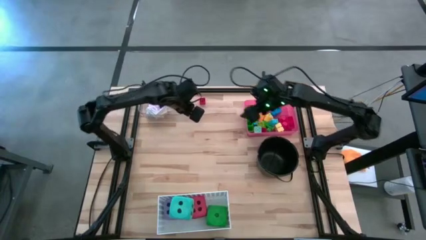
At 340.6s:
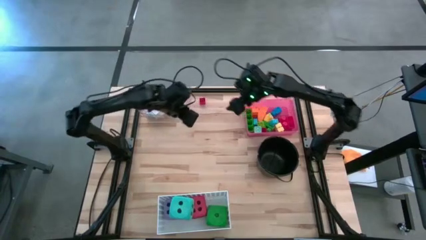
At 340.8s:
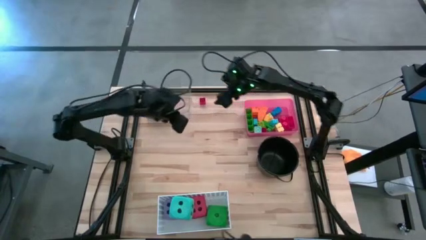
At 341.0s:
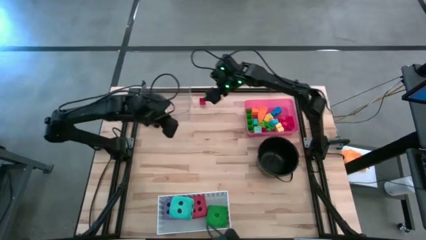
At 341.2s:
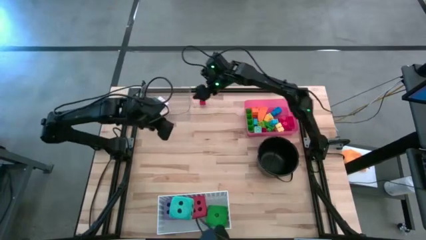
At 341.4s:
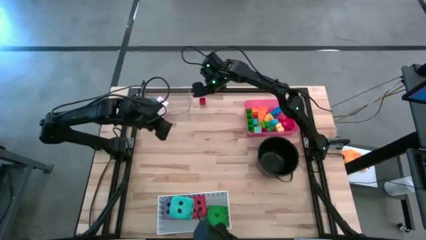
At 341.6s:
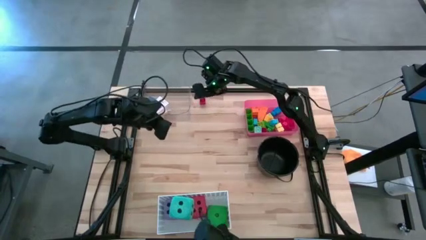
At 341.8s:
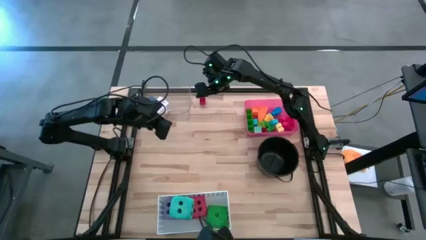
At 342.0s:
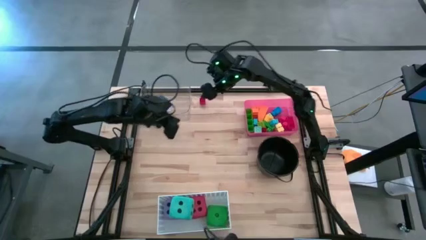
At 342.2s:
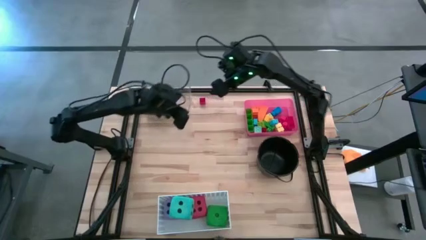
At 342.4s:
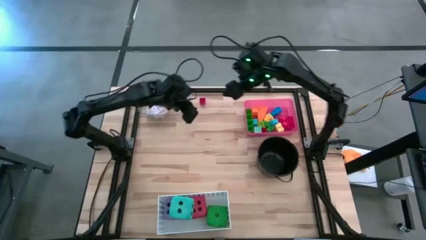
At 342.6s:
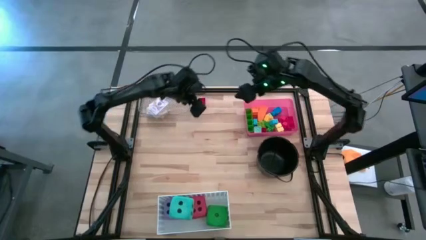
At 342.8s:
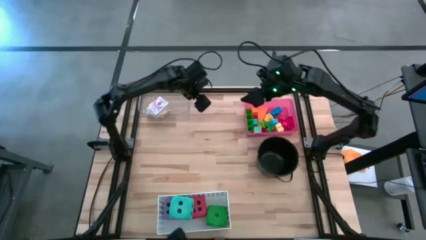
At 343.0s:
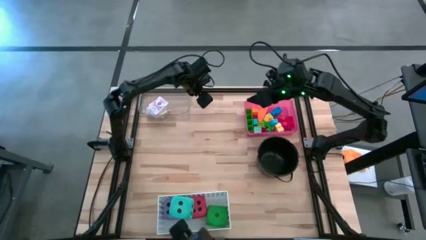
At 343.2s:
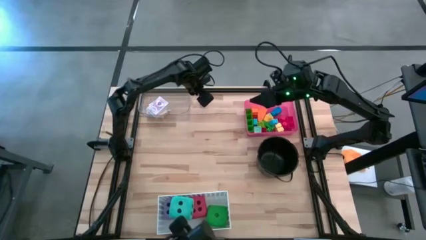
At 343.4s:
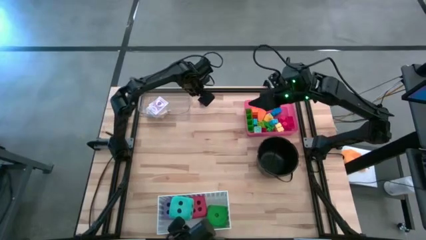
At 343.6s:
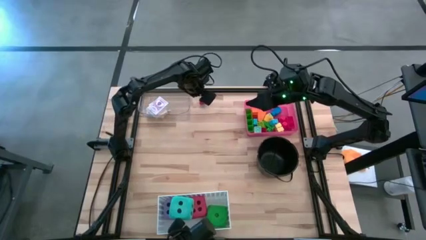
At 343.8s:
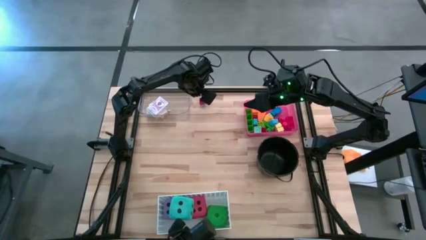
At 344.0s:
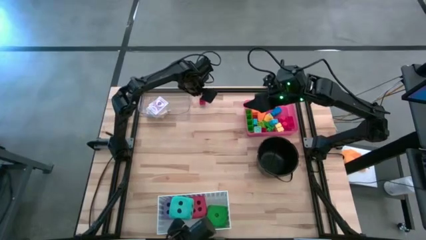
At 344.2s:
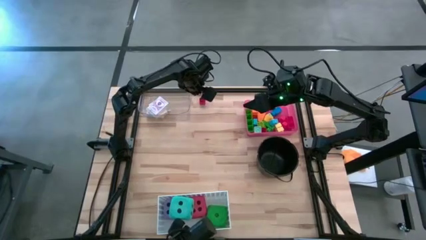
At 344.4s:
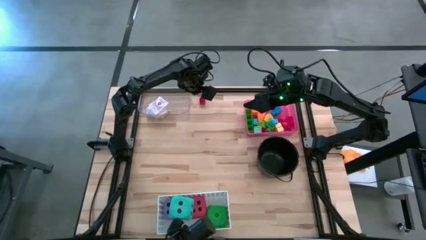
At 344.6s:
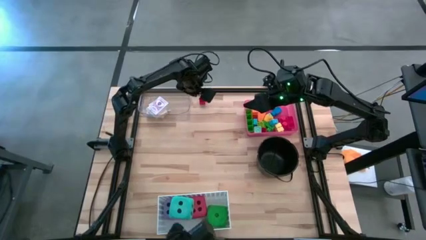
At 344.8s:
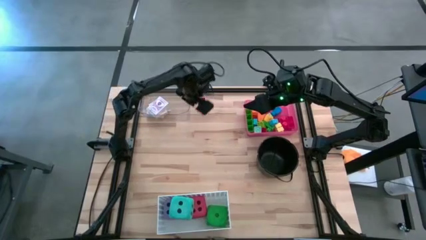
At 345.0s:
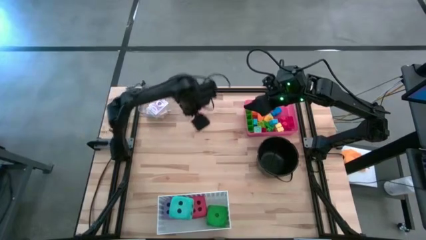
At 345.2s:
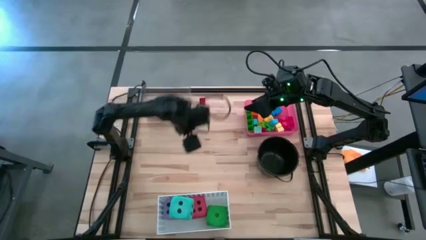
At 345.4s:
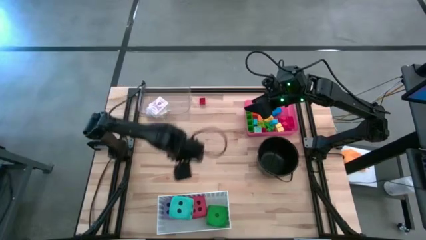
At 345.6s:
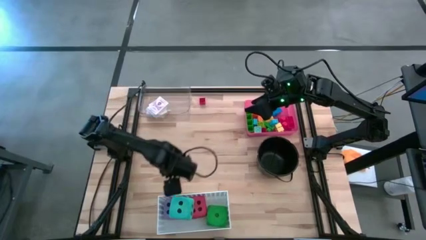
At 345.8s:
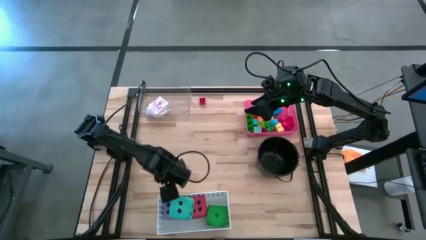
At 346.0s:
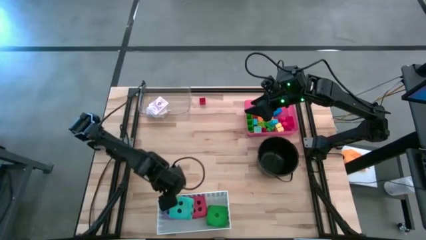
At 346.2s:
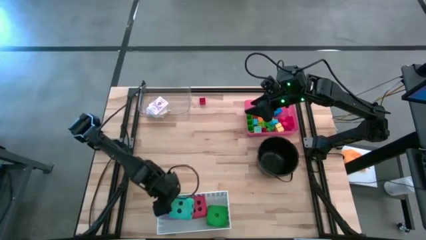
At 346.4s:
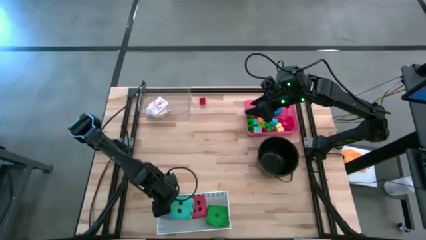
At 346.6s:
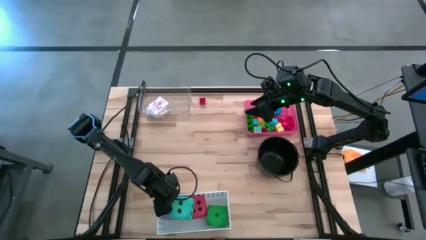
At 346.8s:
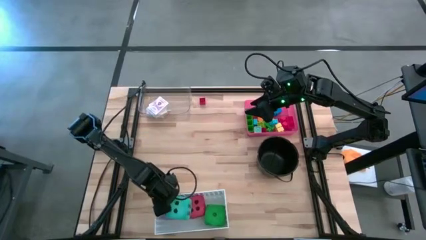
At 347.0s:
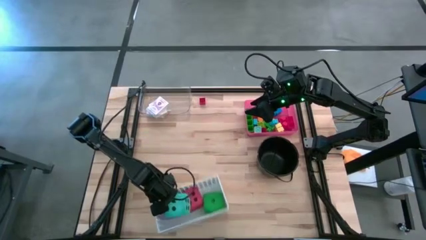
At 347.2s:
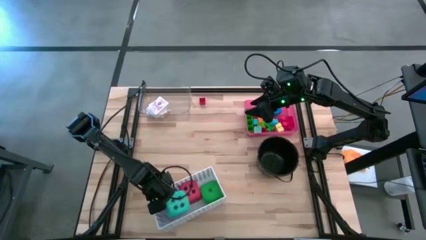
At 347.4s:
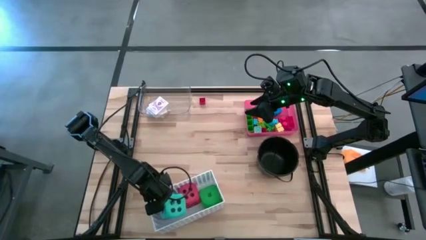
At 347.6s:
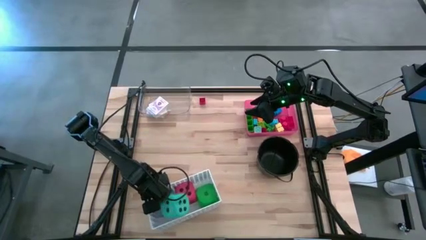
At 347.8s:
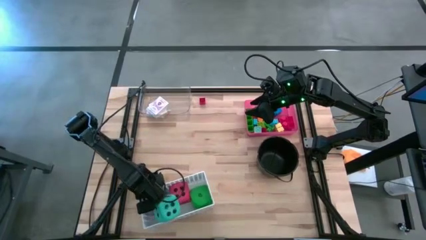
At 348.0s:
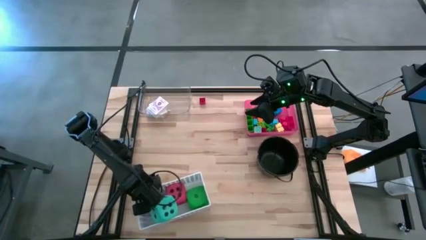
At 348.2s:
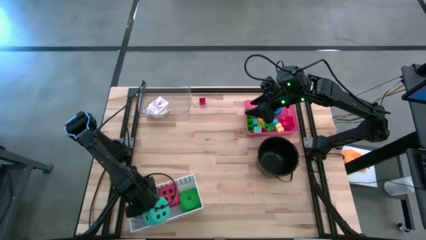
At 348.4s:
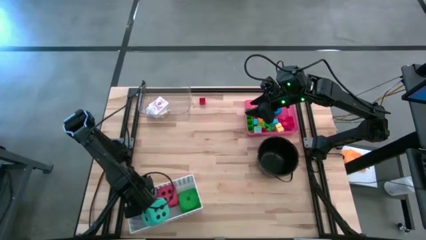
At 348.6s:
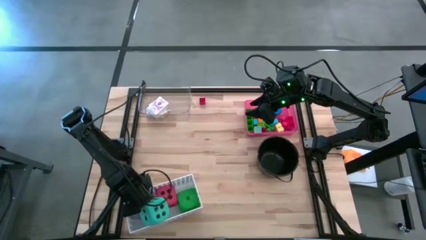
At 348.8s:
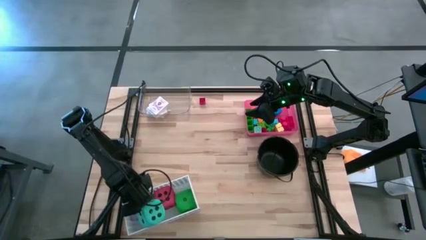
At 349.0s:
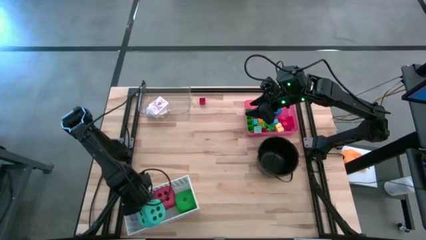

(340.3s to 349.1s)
Task: Pick & Place Toys
Adjust the white bin

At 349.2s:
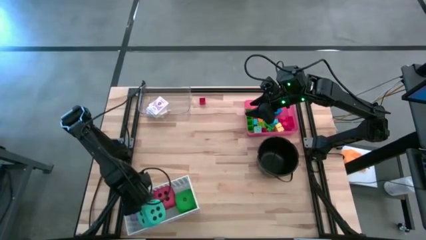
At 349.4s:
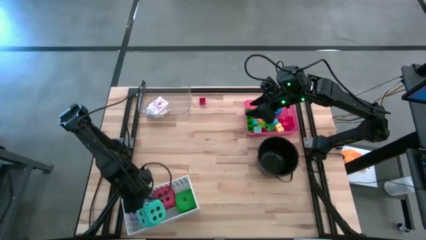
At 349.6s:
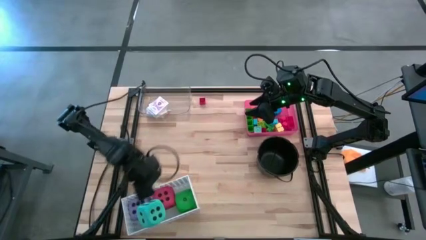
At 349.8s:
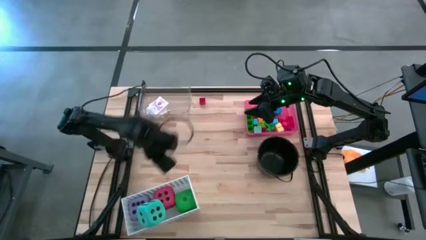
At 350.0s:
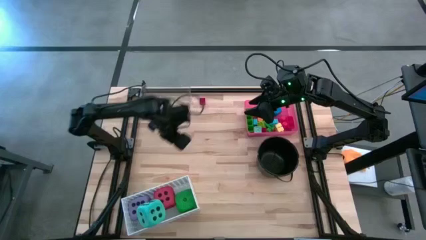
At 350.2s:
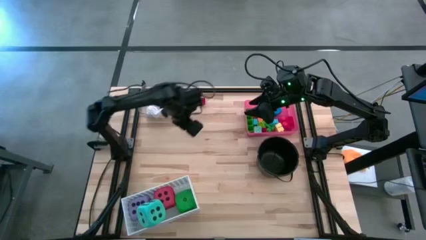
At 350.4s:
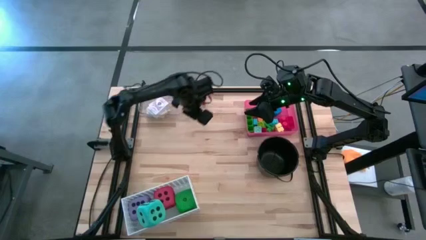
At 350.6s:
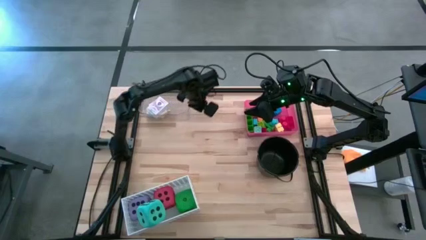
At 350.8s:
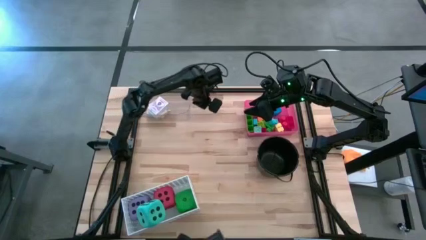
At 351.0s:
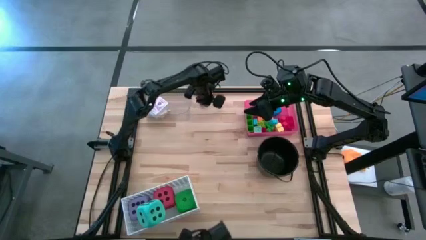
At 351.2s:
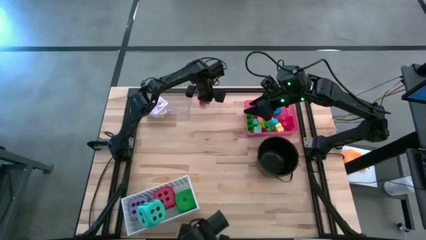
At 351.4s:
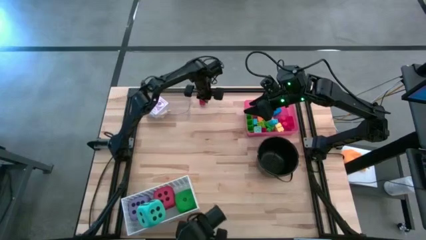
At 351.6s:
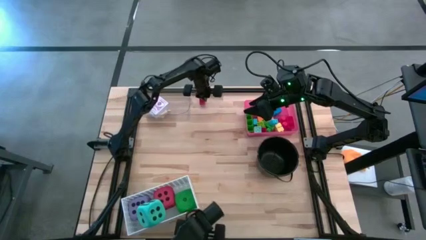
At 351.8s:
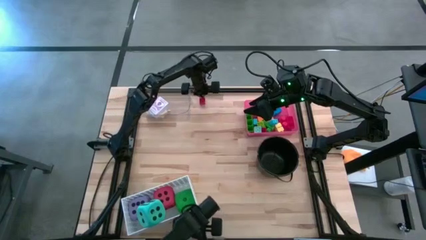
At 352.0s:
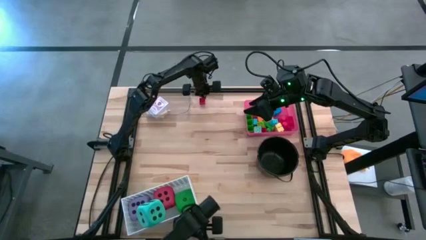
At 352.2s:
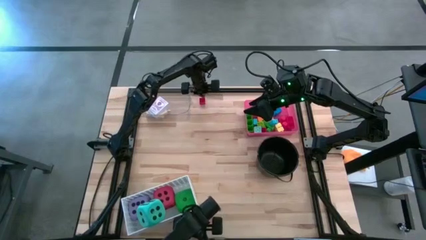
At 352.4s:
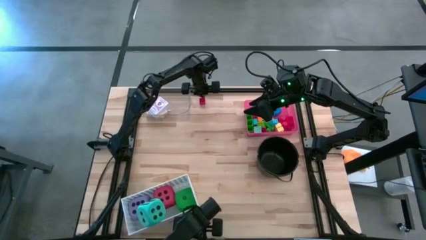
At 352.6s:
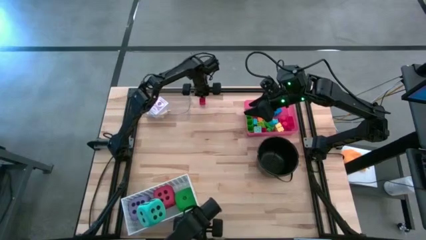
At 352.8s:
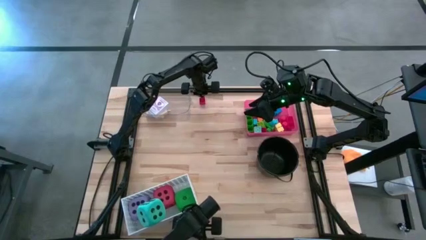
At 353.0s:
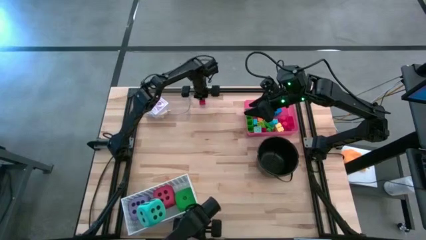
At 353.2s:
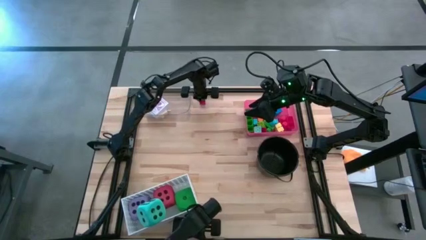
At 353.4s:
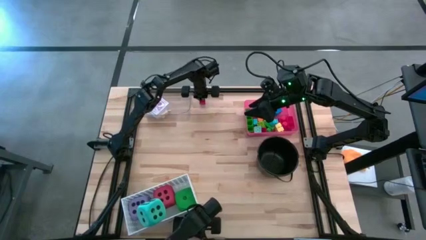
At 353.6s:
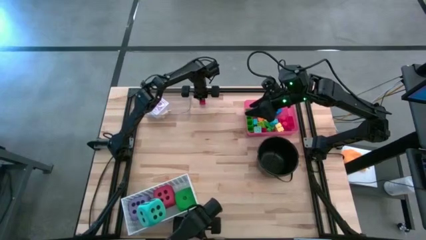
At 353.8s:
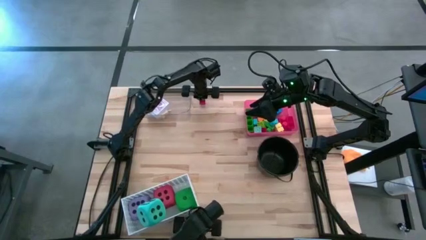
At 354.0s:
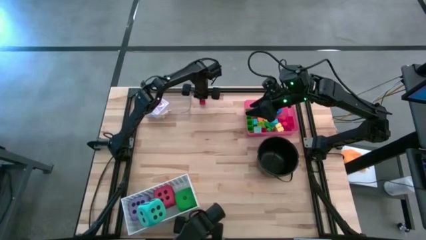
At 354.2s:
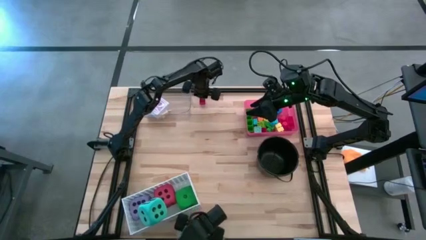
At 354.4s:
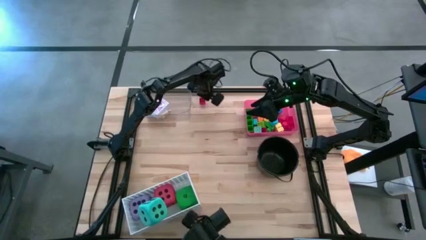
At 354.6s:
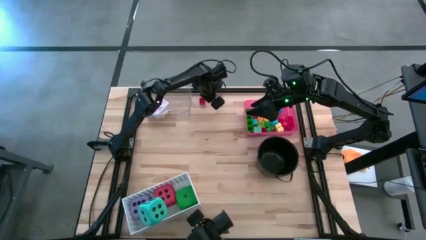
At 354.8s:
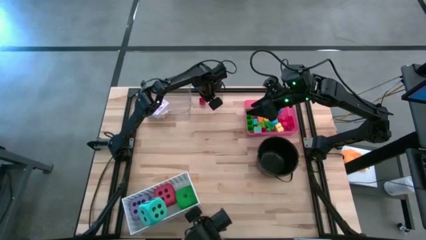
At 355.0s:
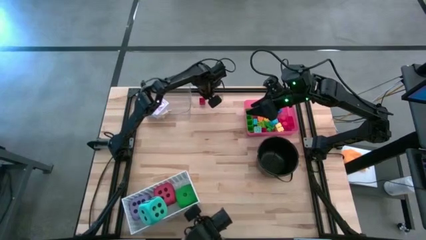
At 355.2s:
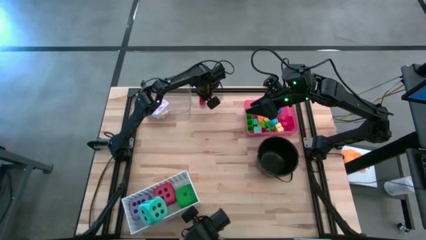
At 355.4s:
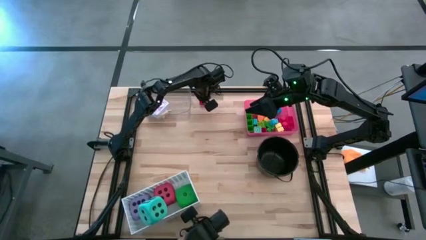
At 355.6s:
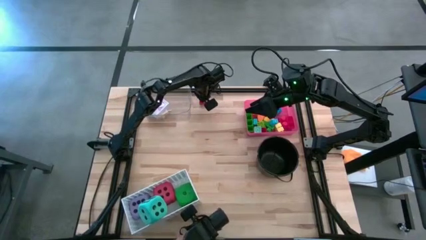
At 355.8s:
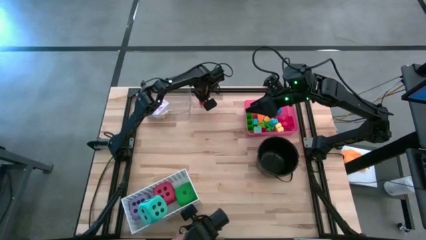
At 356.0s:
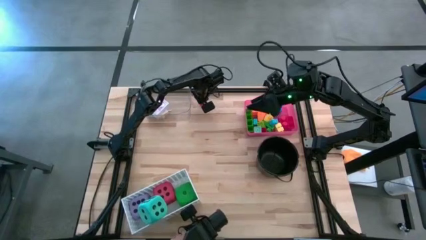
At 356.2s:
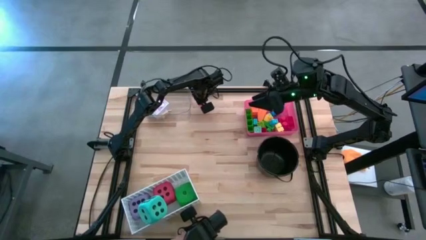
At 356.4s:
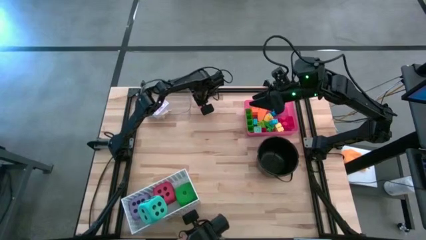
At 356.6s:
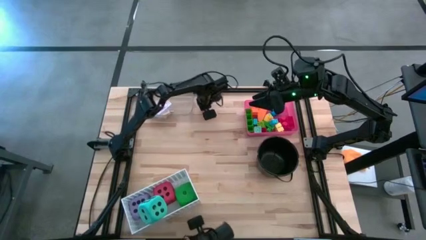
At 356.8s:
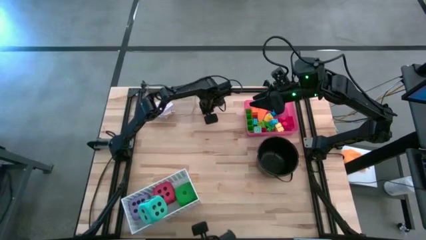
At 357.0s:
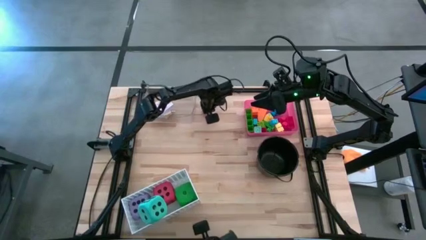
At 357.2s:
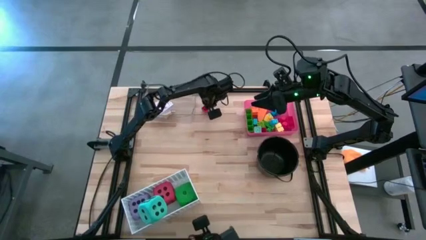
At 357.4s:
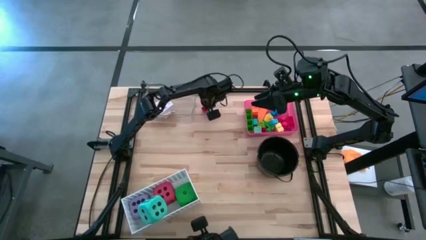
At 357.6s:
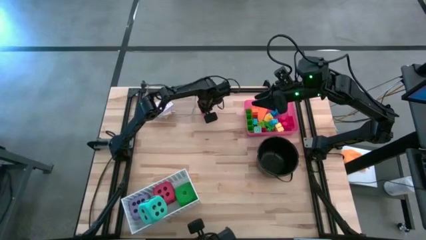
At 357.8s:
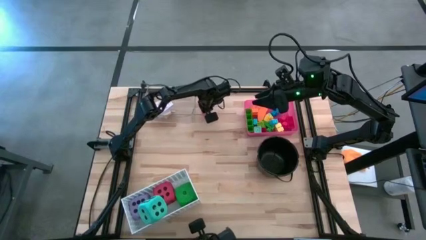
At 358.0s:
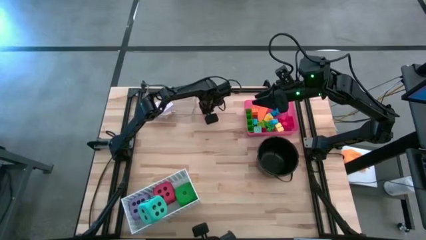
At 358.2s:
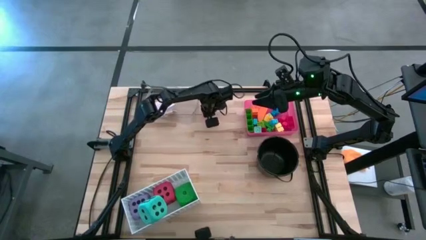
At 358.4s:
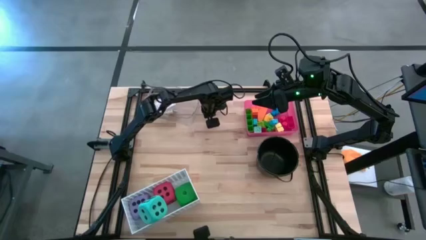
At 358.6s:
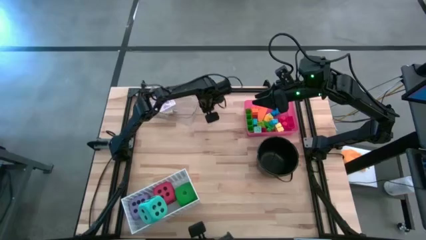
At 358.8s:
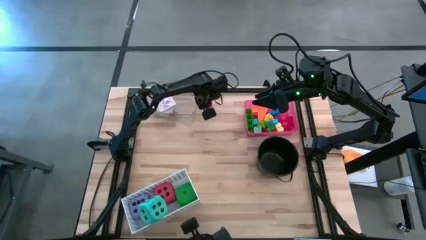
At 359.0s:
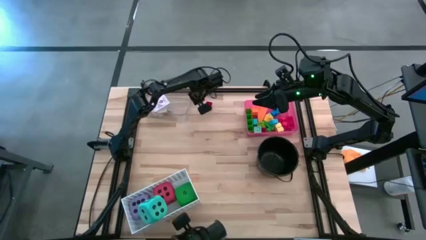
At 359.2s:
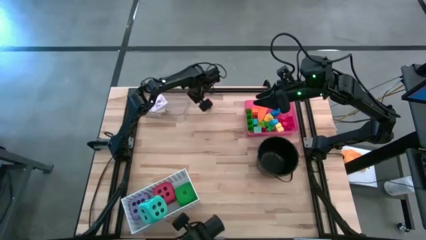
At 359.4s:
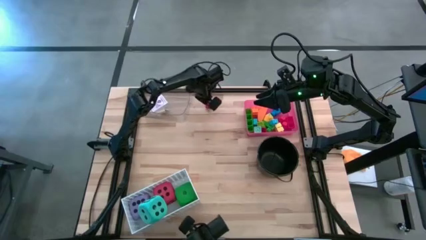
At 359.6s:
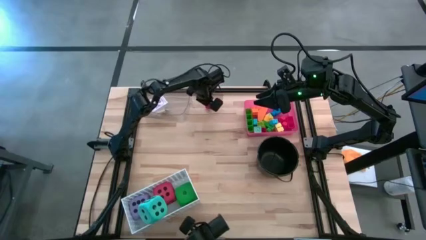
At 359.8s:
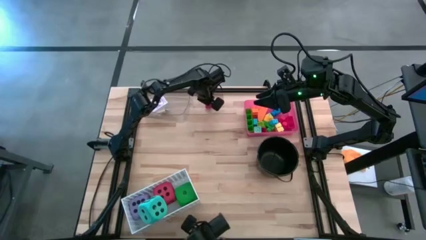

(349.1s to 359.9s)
Put the red game piece into the red bin
